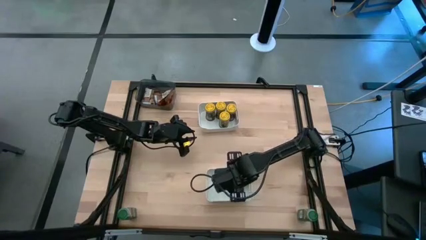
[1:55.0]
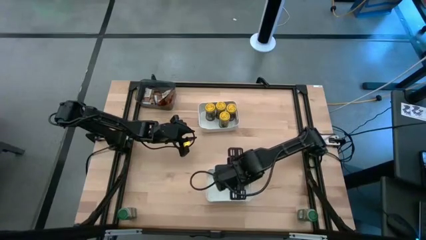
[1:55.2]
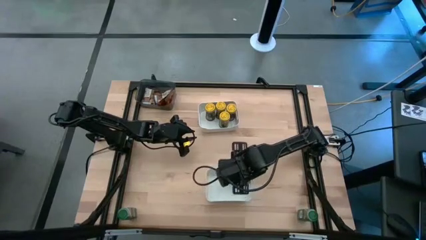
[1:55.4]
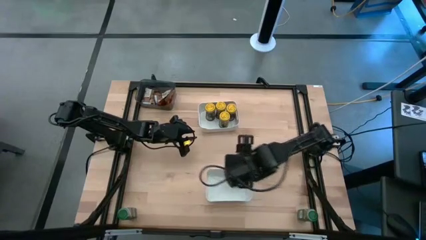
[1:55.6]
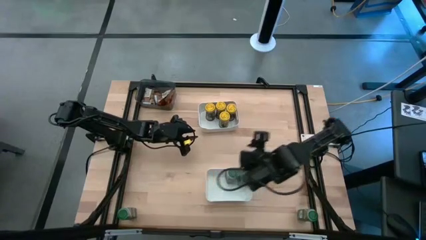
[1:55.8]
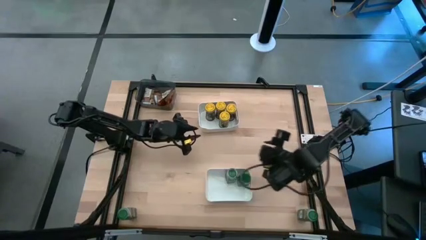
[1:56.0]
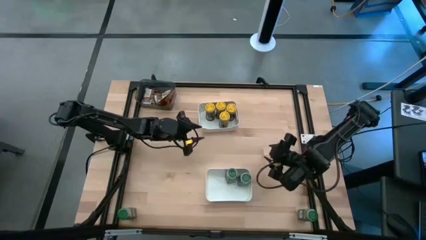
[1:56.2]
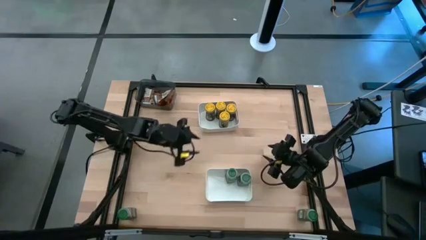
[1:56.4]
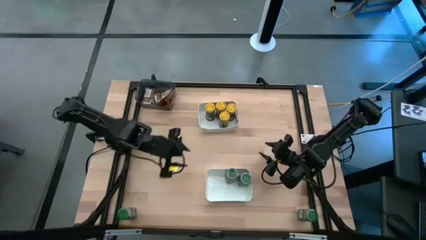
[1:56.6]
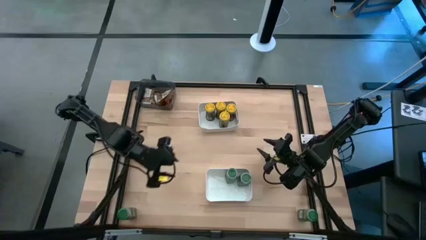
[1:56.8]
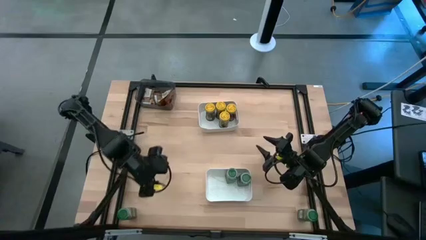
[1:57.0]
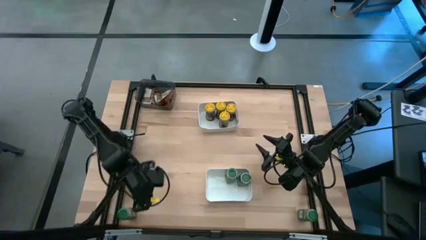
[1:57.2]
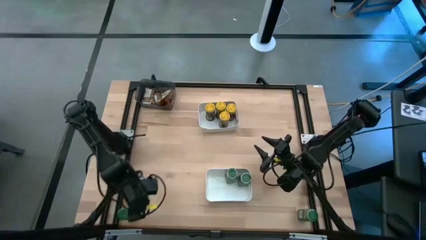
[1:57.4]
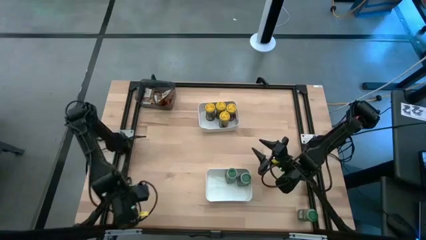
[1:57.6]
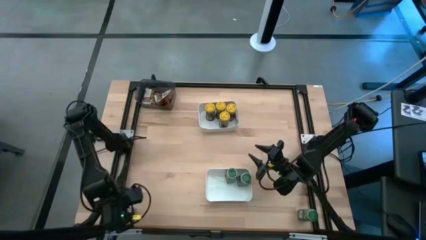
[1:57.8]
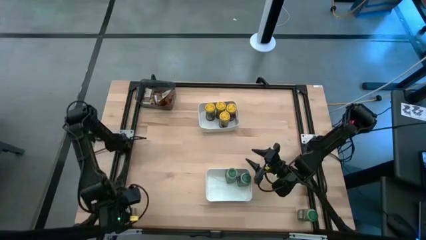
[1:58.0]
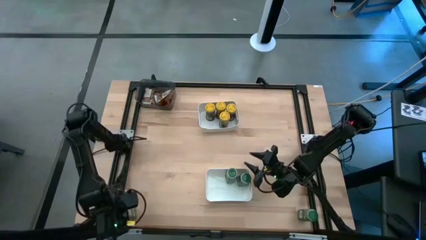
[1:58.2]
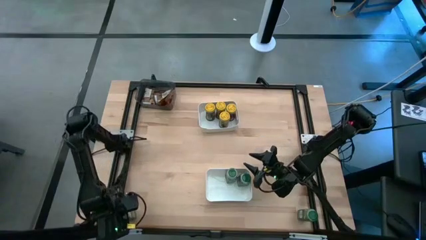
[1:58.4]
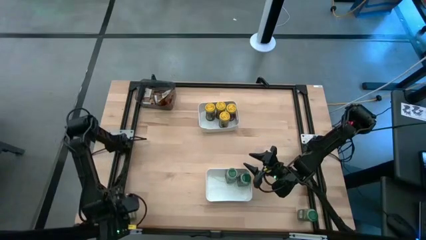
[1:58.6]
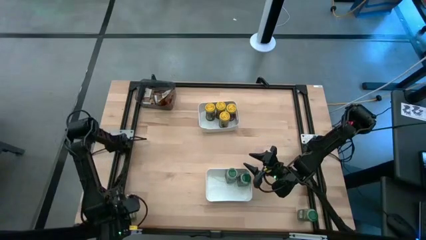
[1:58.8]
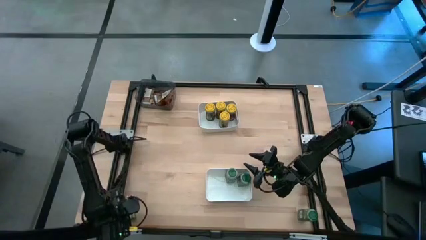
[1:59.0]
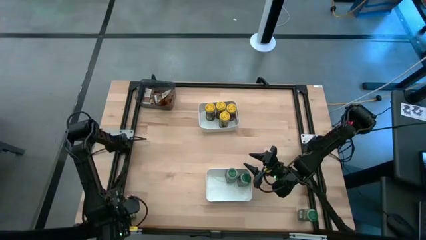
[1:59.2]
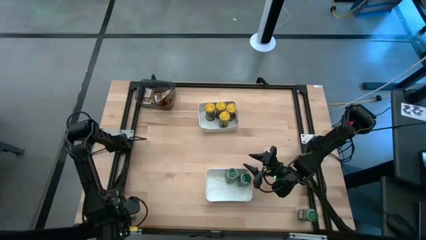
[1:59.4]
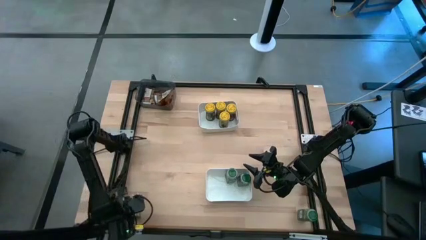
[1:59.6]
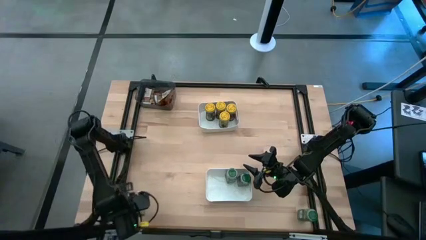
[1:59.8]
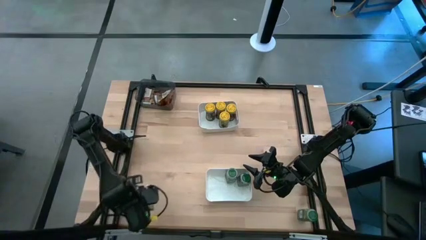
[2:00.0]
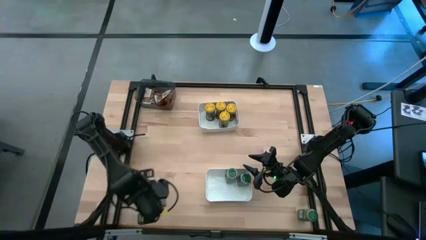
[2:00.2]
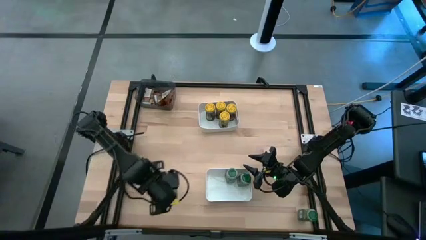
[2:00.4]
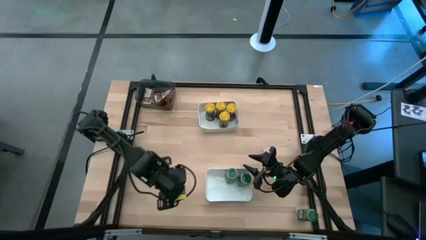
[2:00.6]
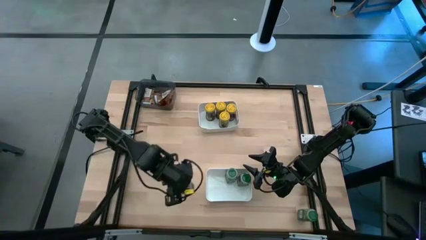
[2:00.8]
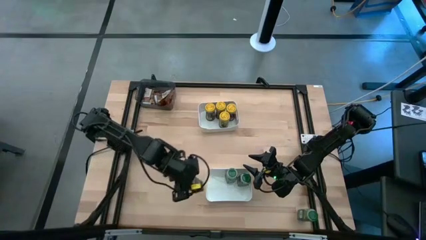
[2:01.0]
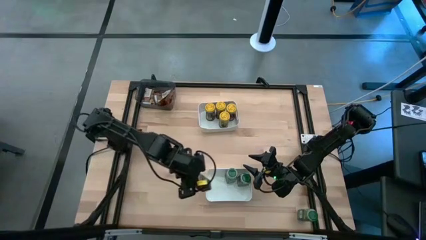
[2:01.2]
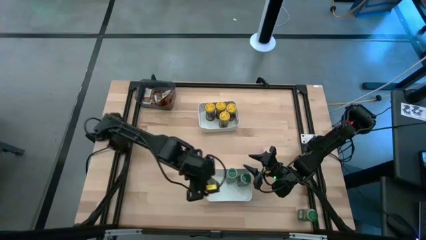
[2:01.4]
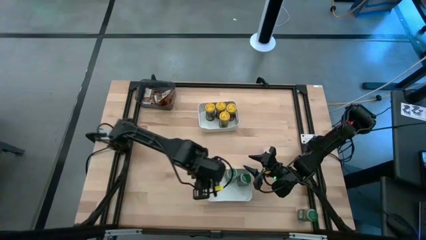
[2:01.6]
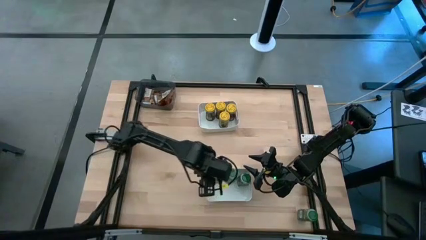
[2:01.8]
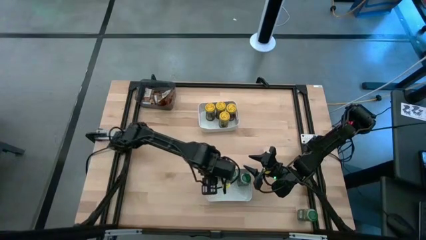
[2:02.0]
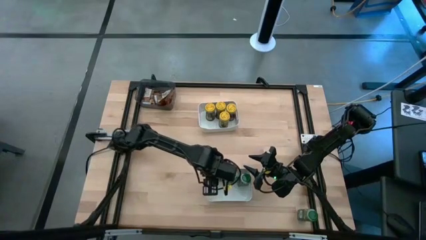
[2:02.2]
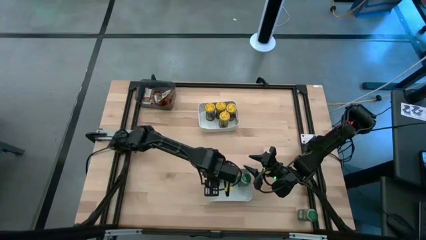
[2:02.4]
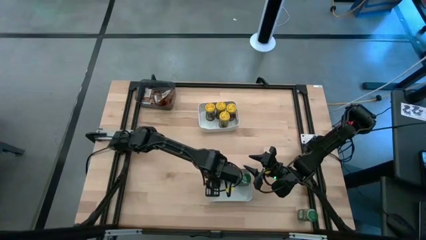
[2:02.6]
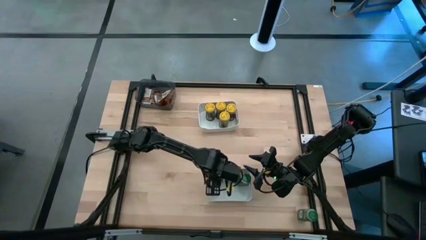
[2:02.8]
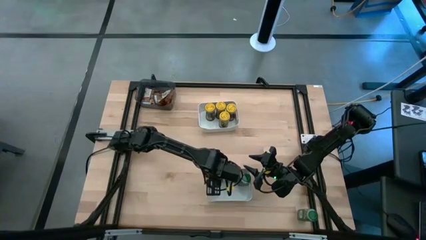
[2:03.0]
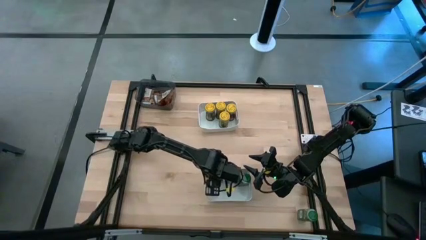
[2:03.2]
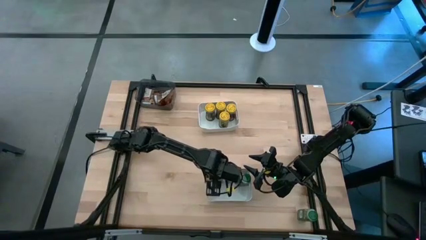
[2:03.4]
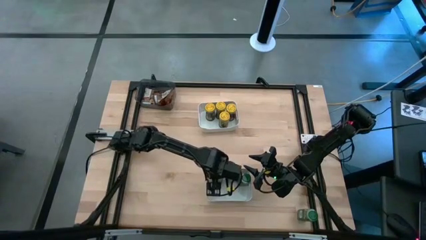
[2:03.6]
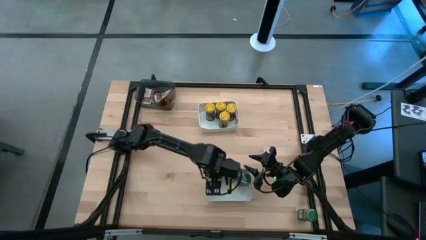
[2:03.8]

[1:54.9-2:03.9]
Task: Sort spices by type
Put the seasoning bottle into the bottom white bin

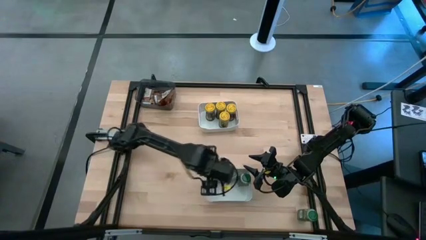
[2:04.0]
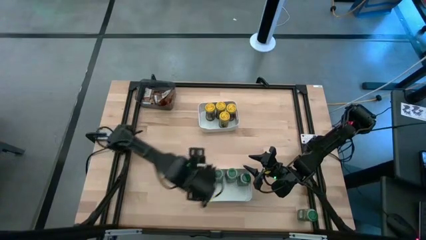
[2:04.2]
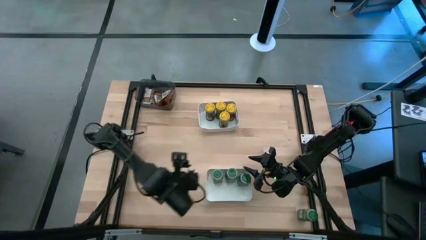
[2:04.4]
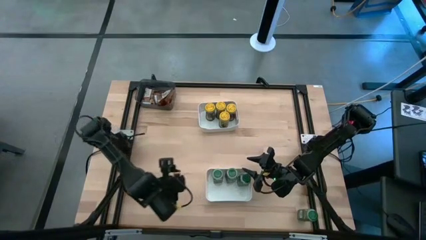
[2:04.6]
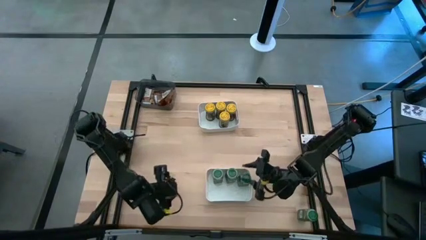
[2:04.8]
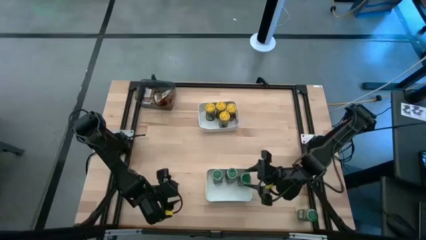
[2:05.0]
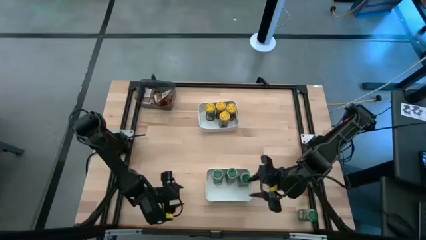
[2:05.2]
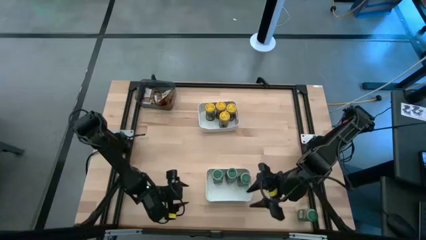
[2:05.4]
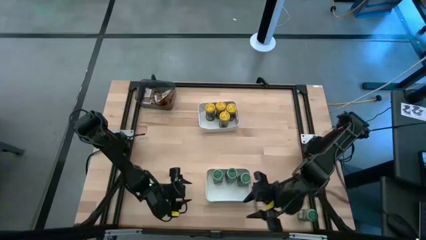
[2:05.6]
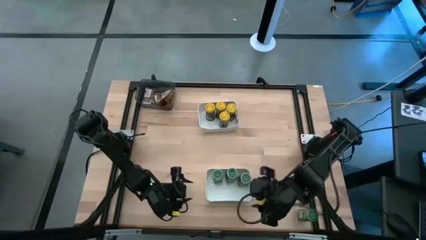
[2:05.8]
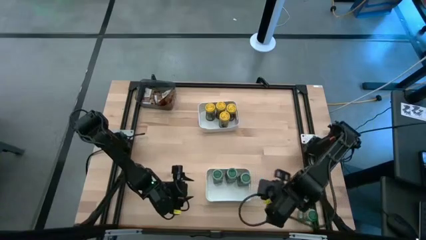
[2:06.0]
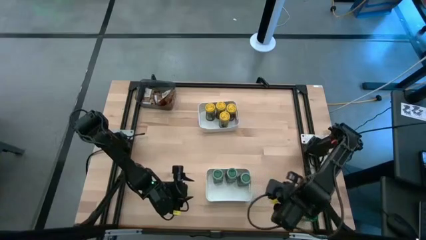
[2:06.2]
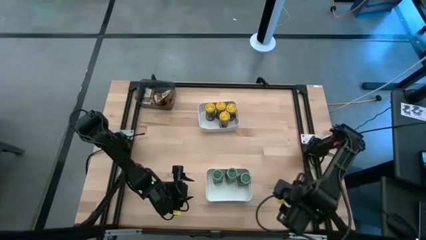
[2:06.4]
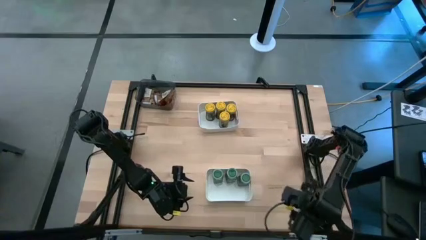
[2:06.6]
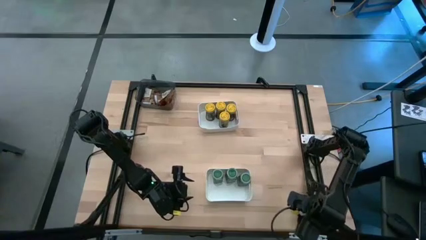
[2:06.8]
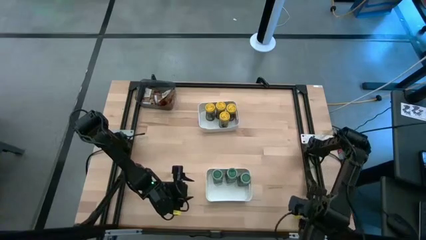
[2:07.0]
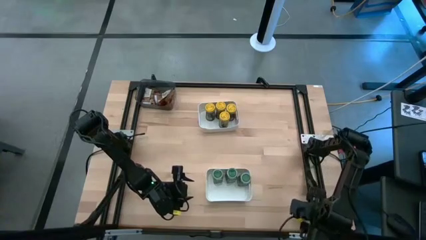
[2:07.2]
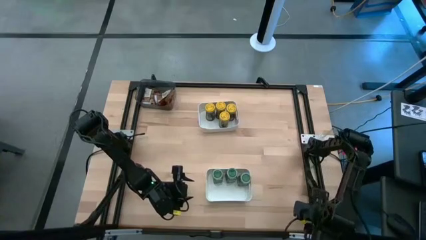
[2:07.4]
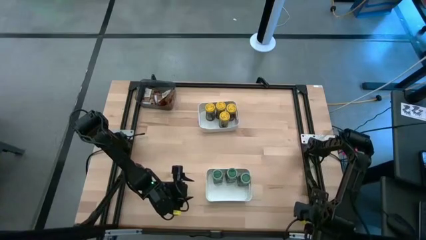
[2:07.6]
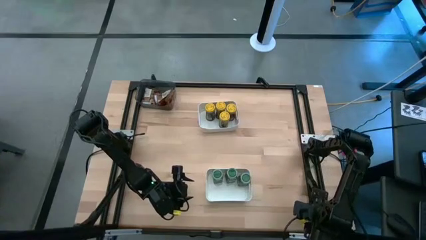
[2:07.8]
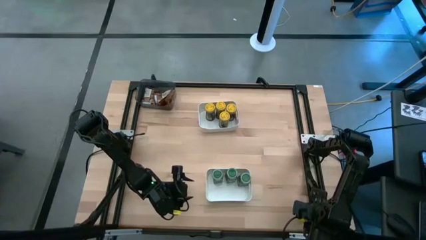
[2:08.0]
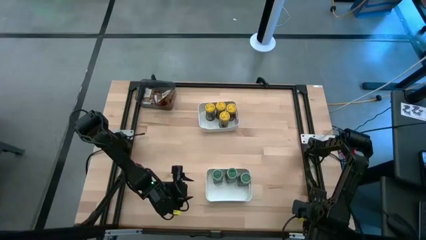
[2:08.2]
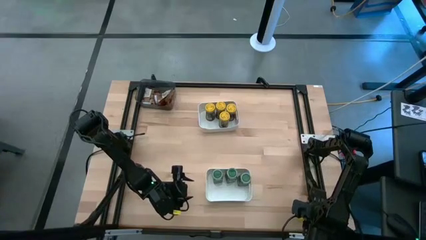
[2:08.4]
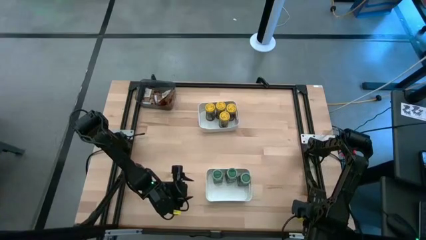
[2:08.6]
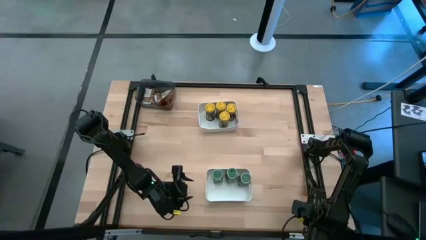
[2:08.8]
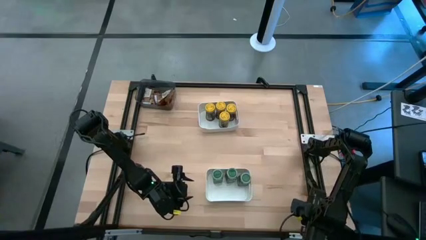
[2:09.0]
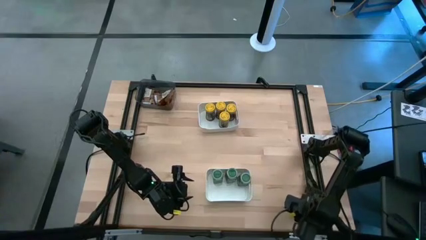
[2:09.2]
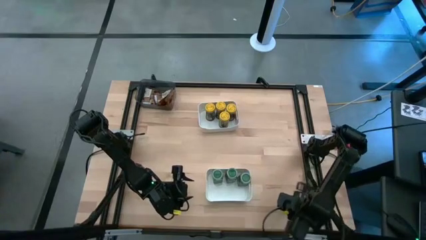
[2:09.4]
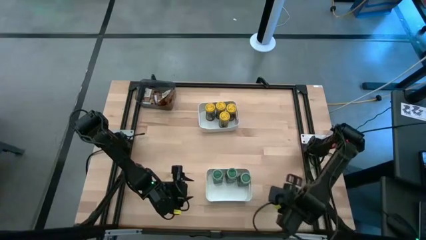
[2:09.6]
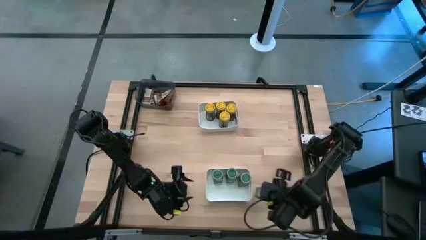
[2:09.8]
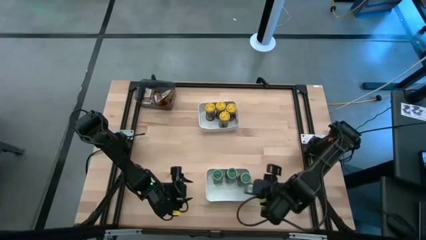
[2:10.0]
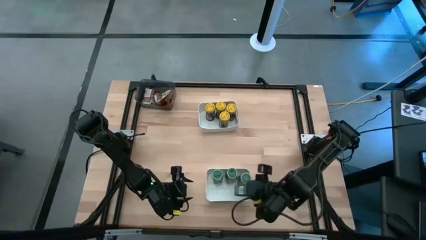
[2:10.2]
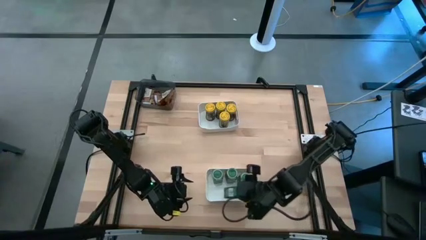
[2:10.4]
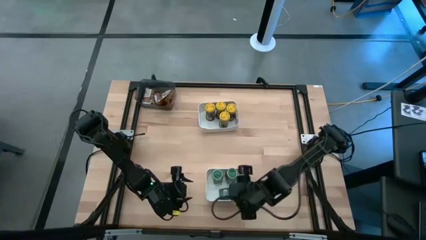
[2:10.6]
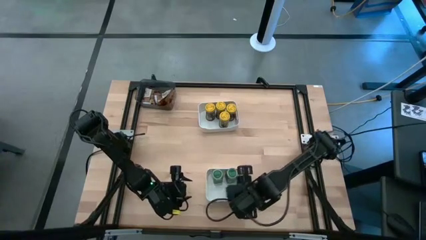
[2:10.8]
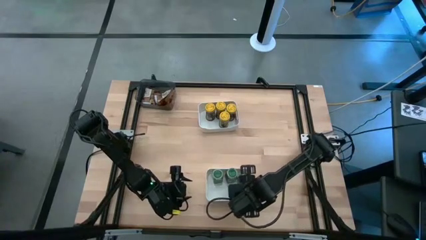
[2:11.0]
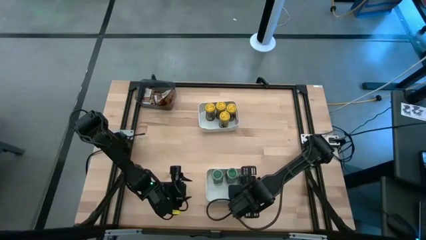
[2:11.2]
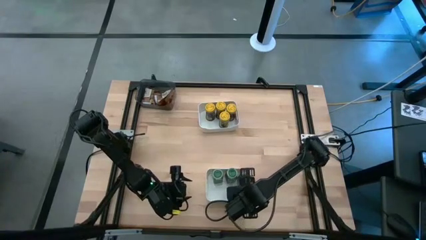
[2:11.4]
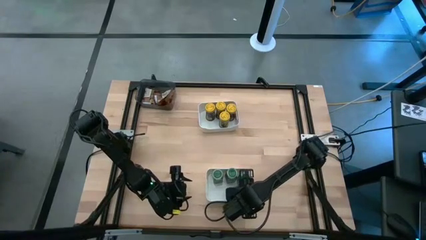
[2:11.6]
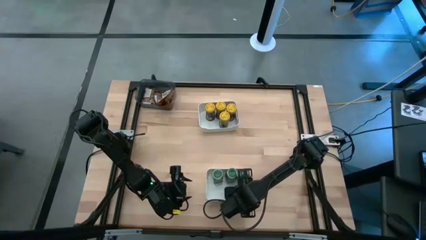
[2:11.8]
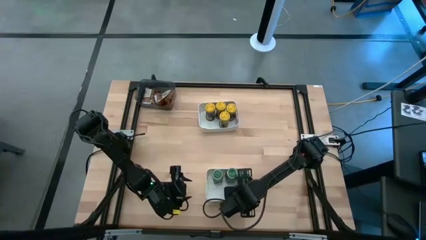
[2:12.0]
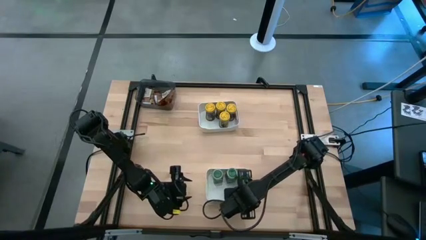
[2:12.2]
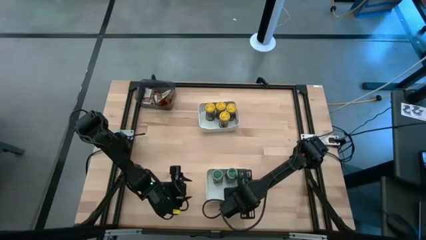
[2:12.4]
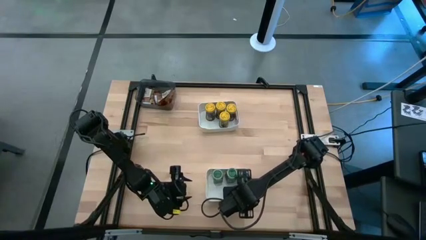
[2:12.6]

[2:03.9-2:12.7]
Put the green seasoning bottle into the bottom white bin
